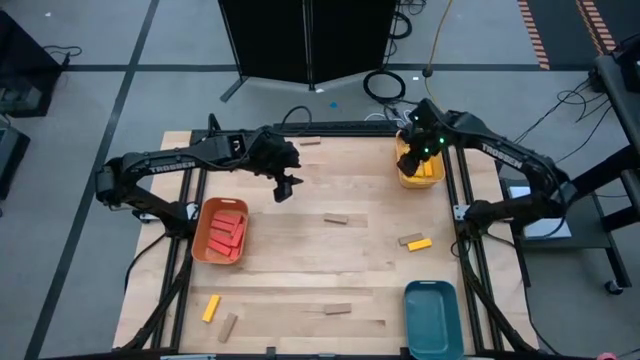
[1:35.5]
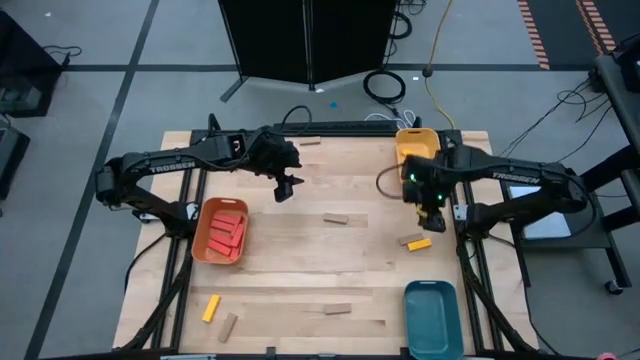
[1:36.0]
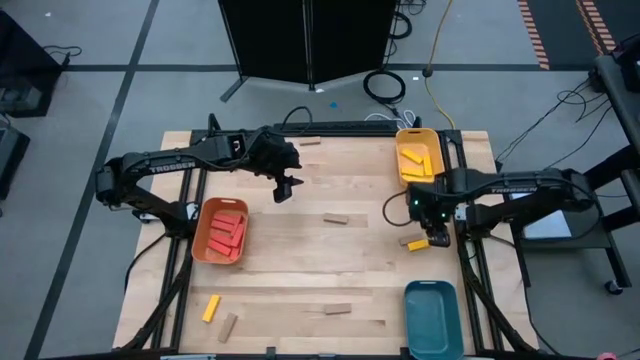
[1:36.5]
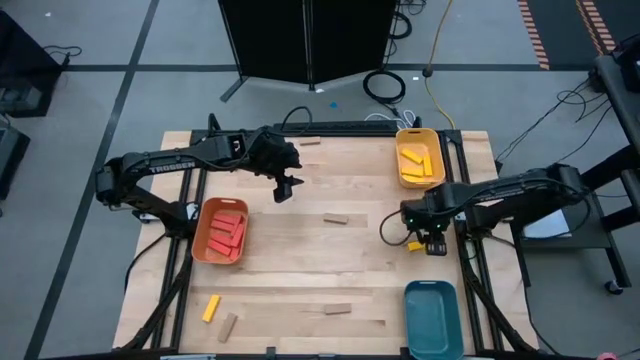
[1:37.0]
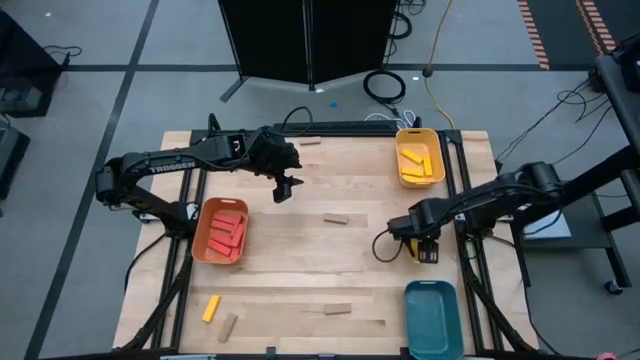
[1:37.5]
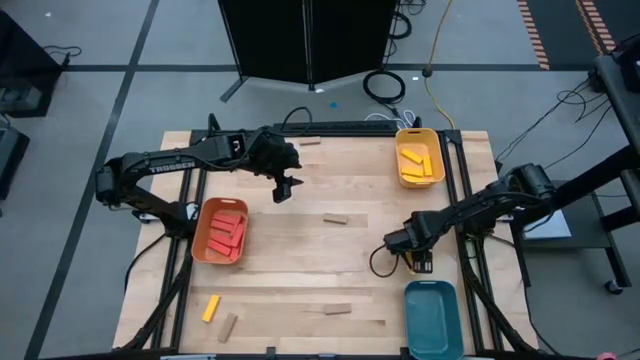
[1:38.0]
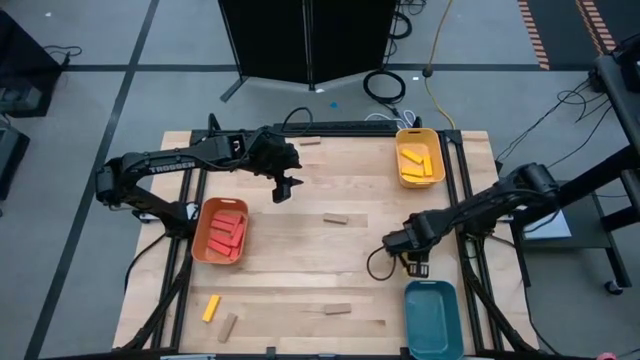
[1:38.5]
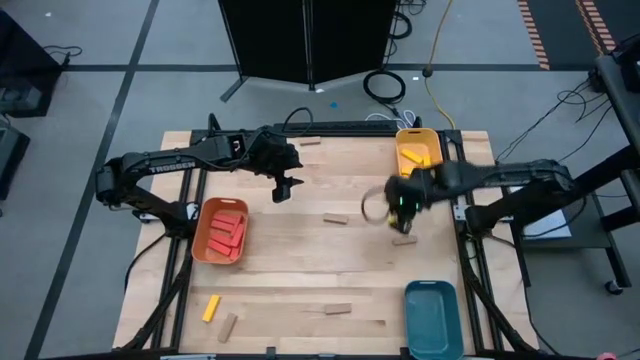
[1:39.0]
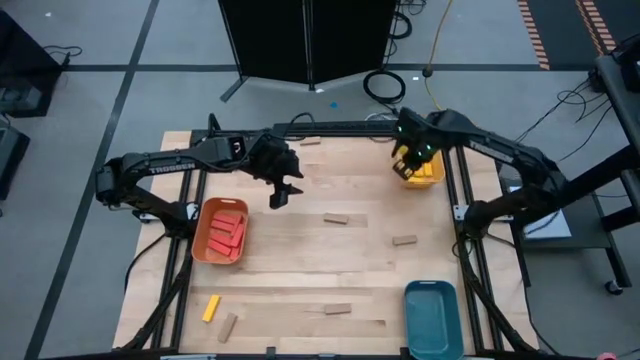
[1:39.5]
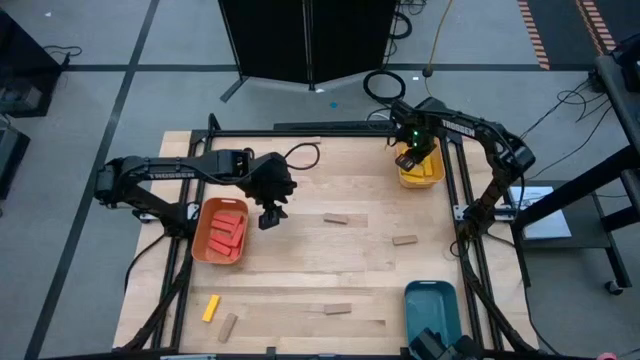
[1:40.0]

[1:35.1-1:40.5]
Task: Sort blocks
Put the yellow block into the yellow bin

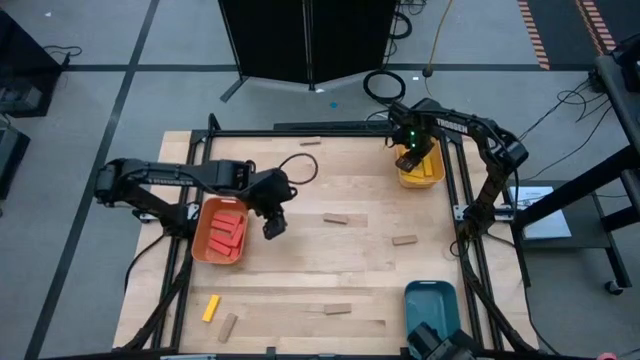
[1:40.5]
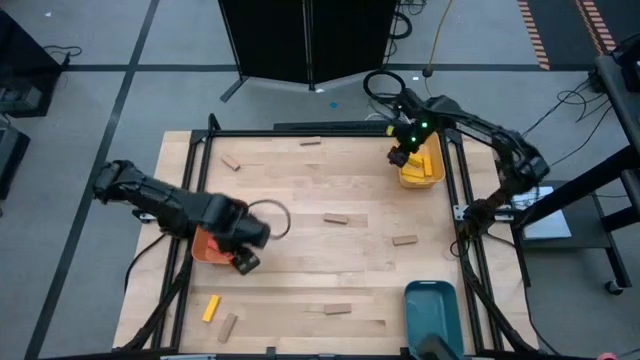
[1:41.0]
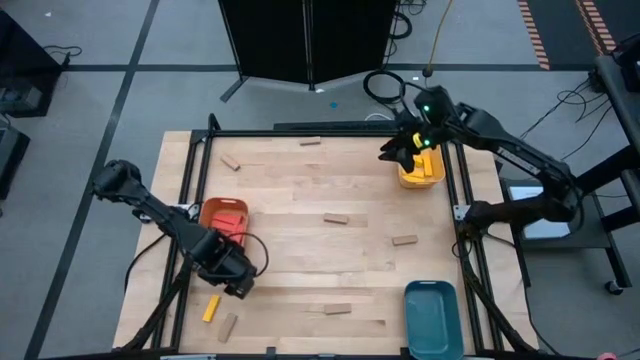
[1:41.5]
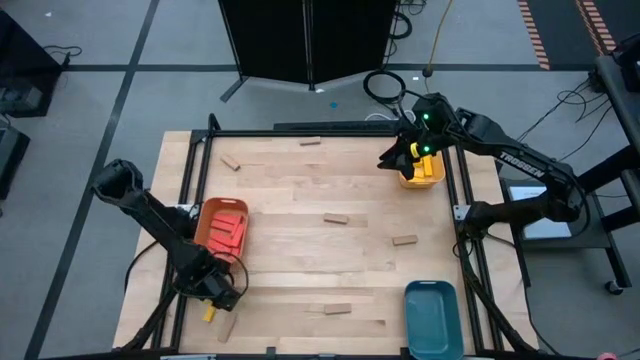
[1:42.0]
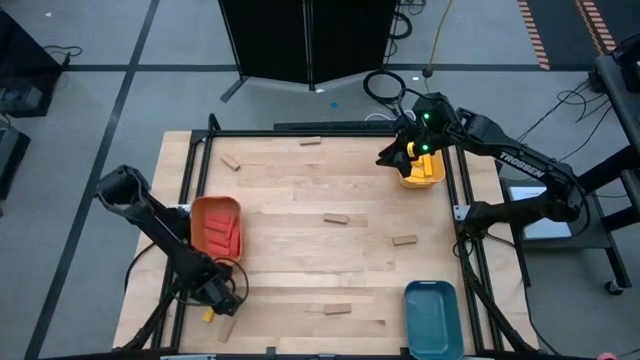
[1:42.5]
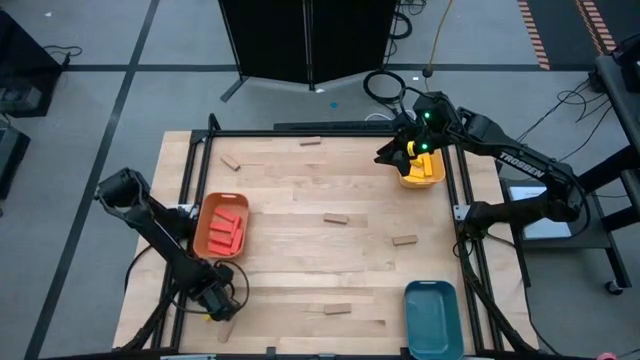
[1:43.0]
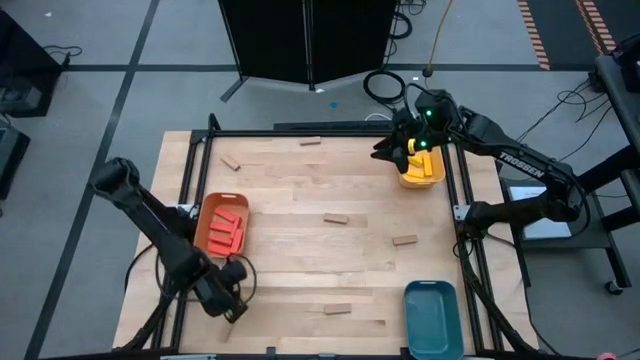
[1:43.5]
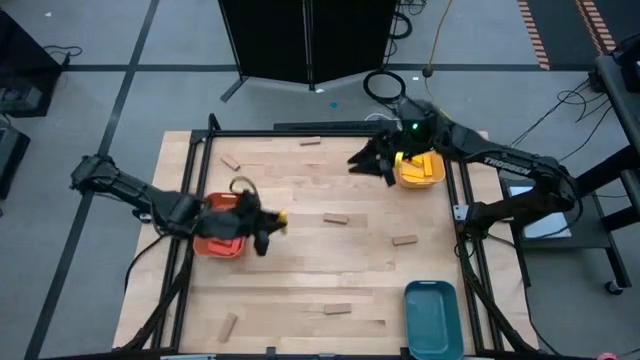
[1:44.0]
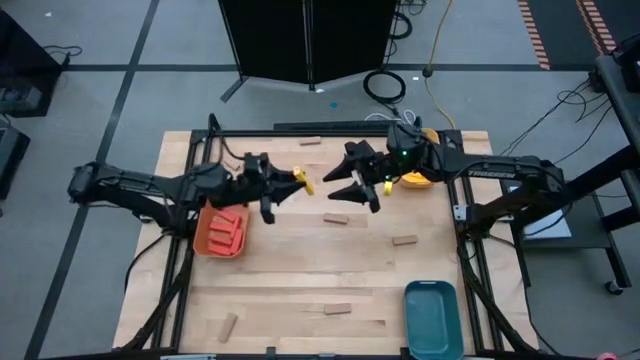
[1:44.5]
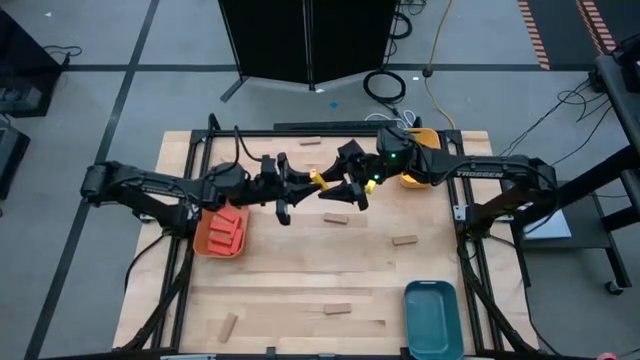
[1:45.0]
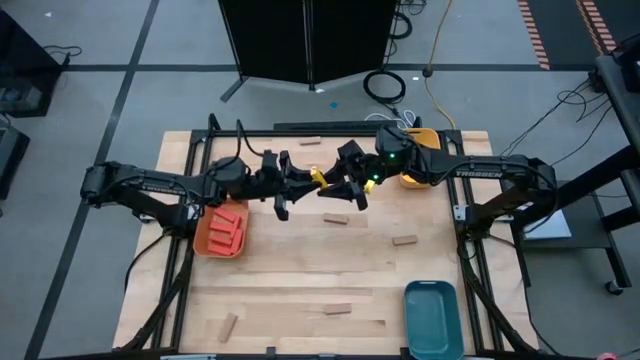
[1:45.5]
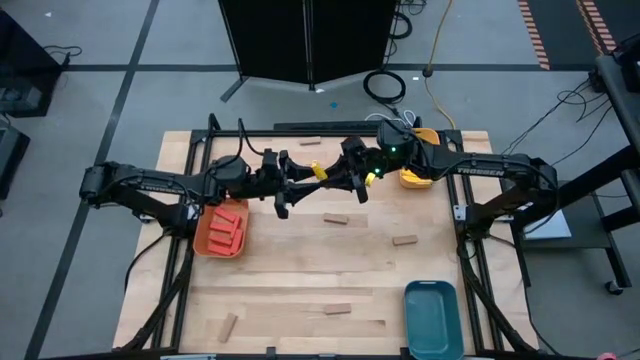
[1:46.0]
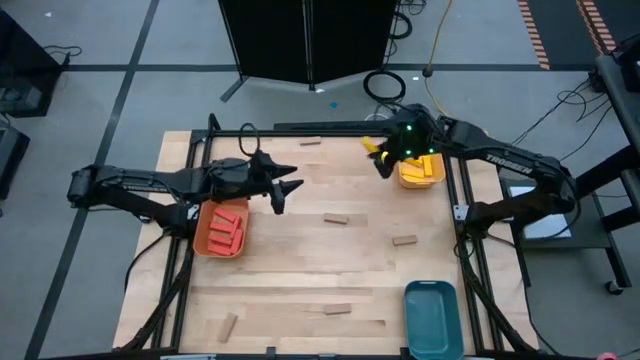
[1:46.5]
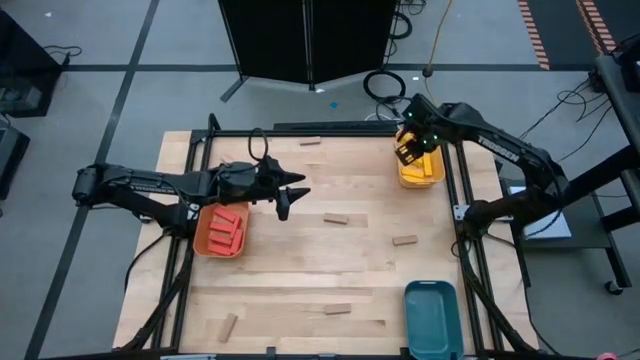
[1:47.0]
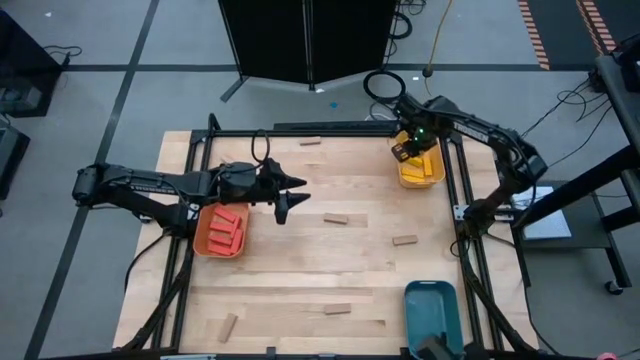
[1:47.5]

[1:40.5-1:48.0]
Put the yellow block into the yellow bin

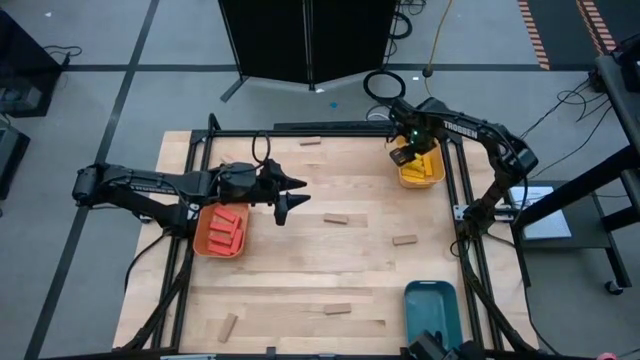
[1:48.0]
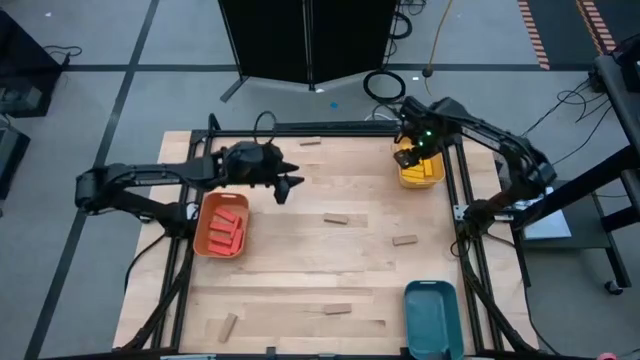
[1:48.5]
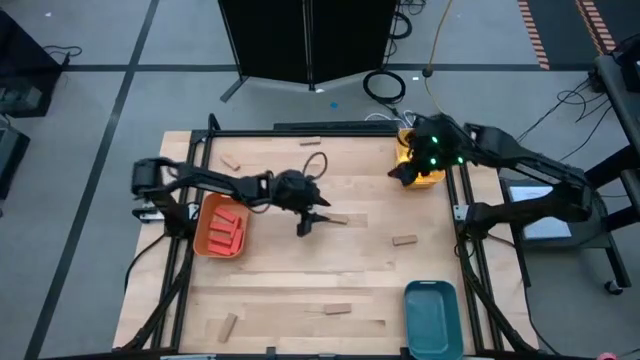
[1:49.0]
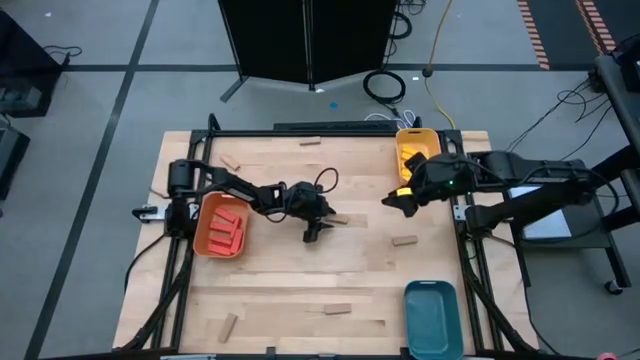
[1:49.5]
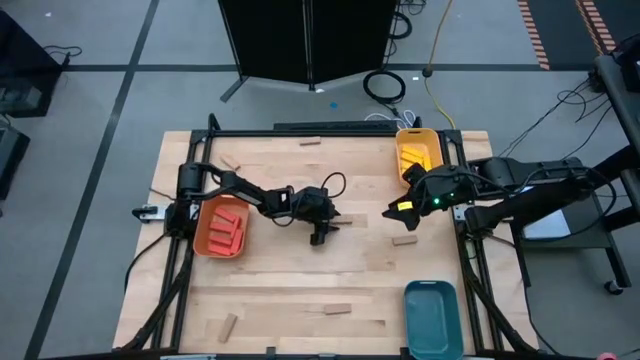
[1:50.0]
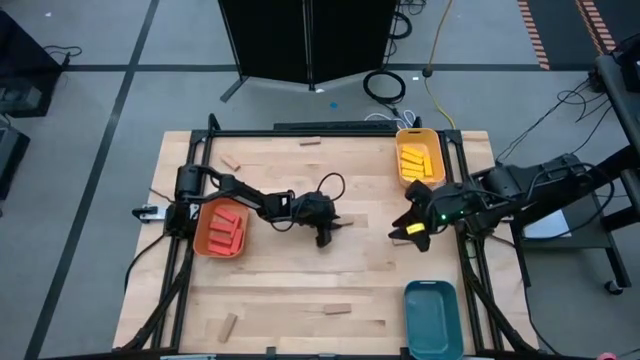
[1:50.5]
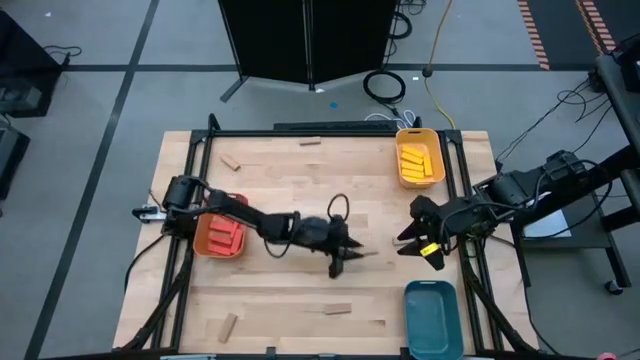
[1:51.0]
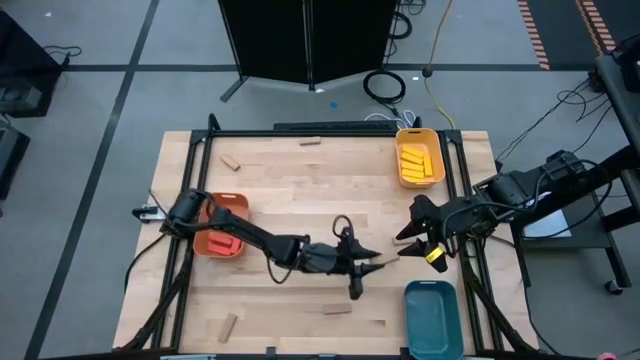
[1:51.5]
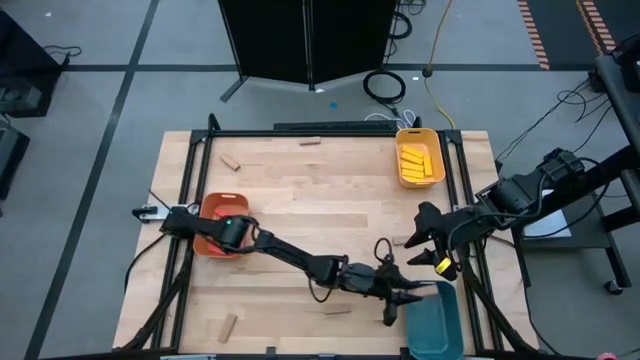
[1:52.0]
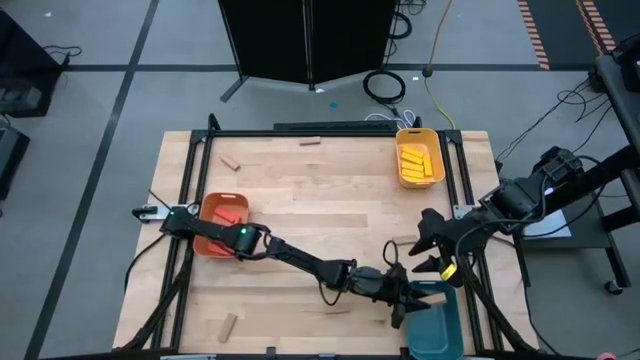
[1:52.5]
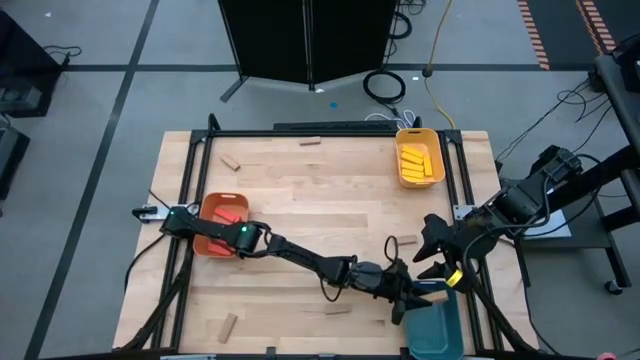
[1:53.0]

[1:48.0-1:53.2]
Put the brown block into the blue bin

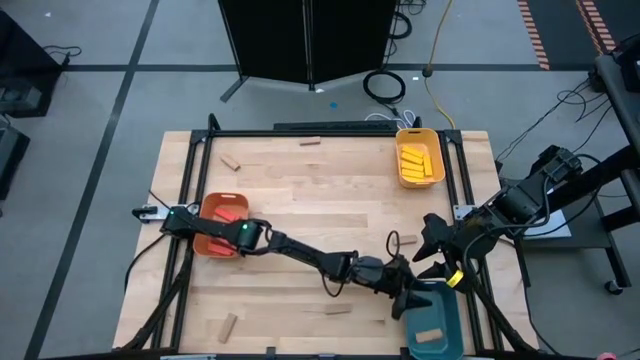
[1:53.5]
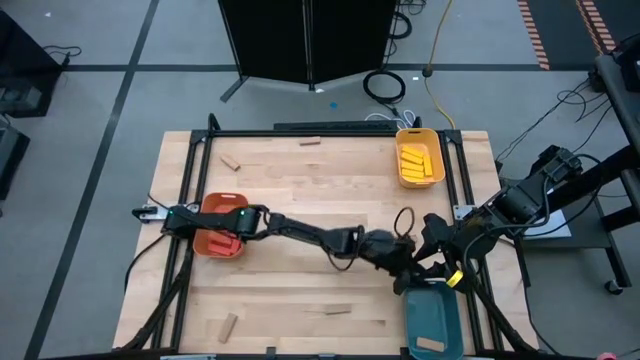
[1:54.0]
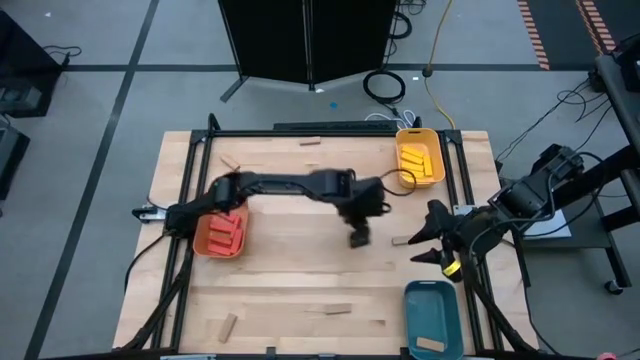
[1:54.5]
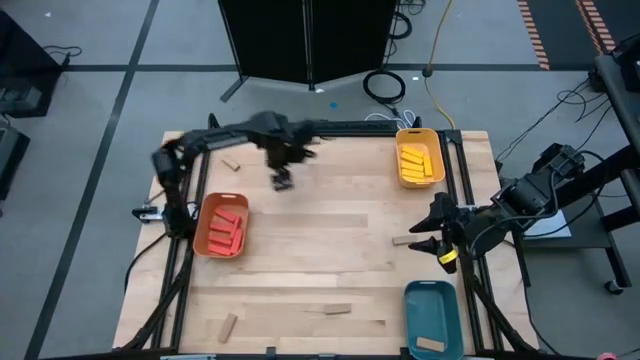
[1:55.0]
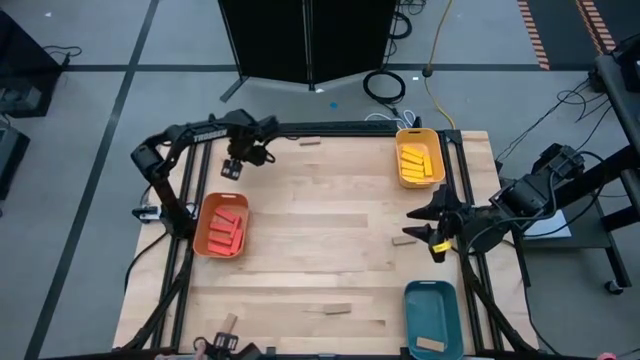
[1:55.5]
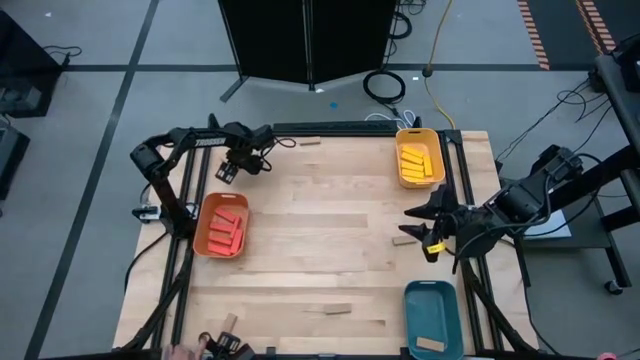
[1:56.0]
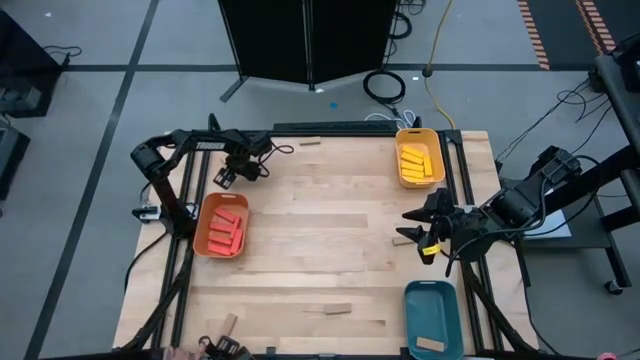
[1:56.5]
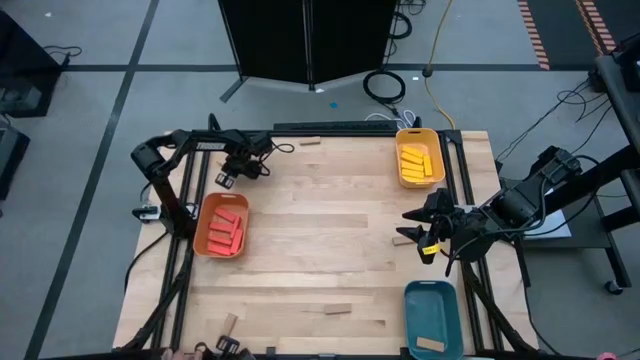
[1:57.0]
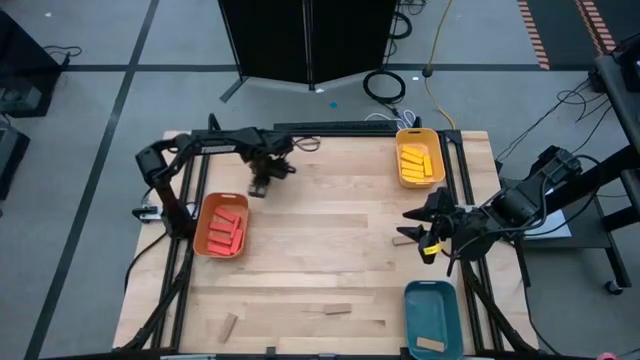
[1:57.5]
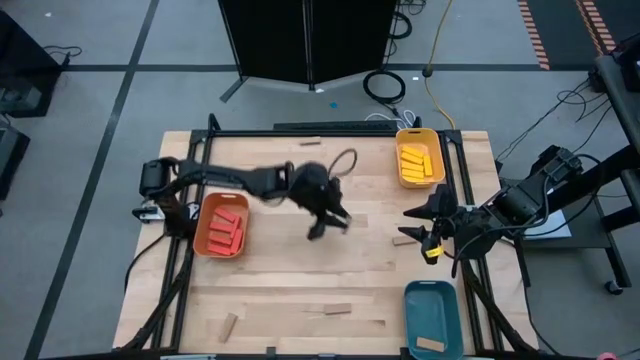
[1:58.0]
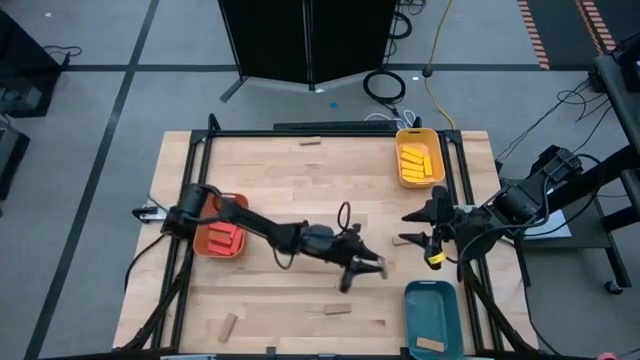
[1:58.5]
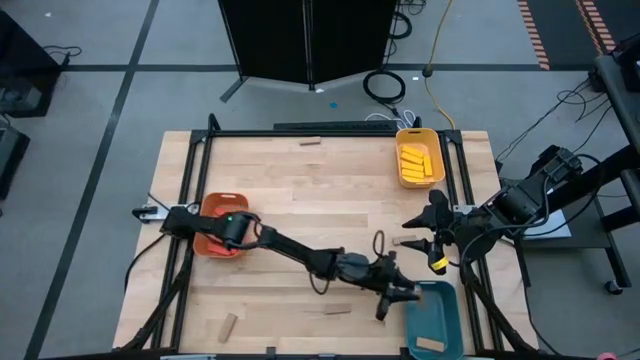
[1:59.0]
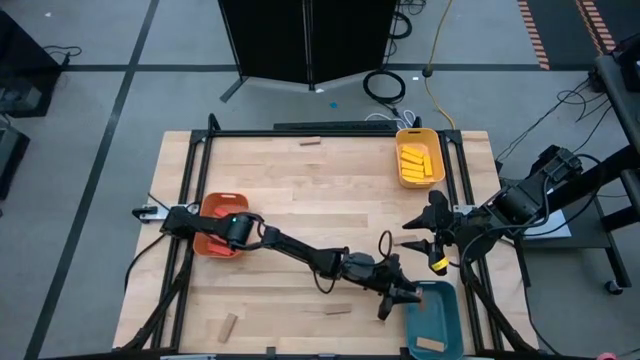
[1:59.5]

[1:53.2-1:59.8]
Put the brown block into the blue bin
